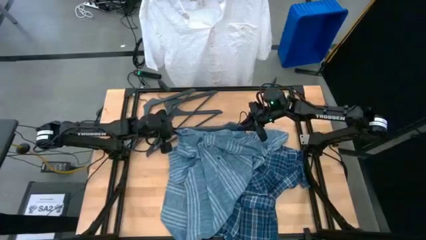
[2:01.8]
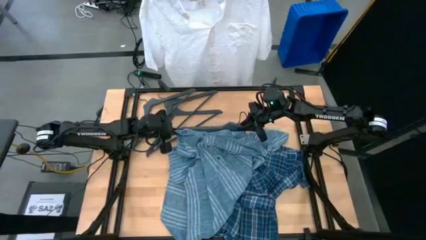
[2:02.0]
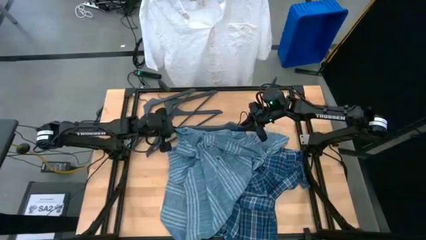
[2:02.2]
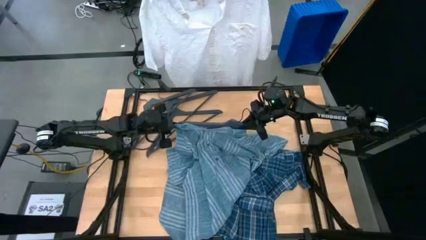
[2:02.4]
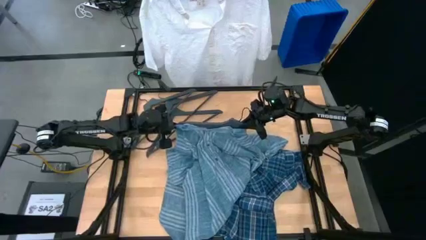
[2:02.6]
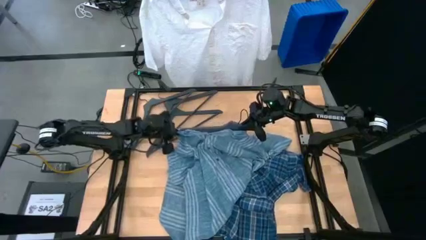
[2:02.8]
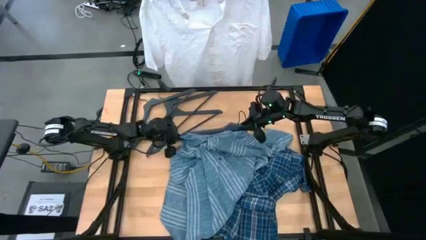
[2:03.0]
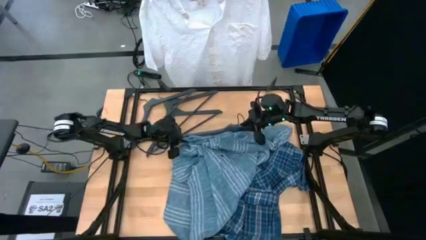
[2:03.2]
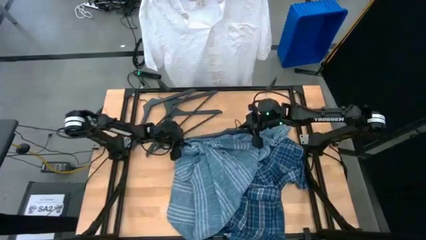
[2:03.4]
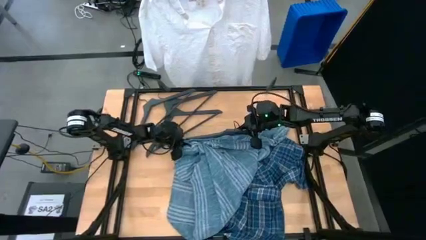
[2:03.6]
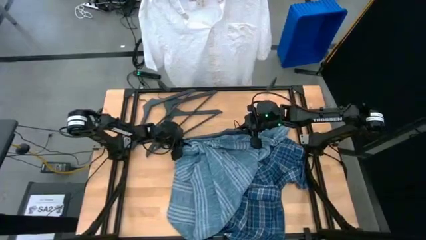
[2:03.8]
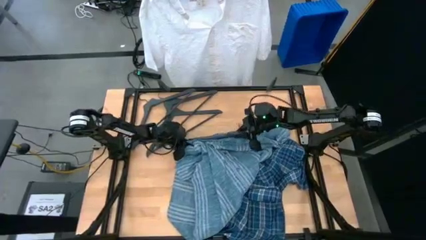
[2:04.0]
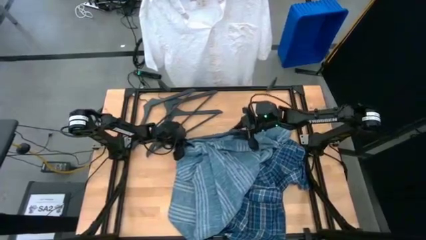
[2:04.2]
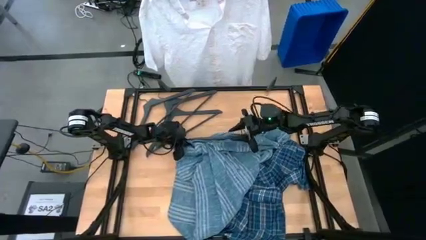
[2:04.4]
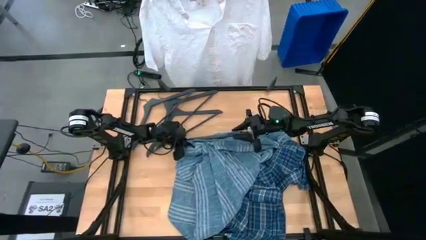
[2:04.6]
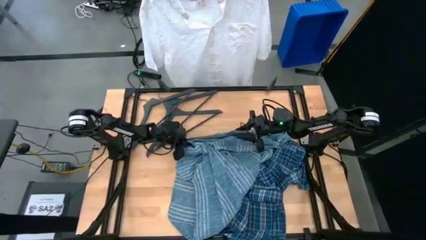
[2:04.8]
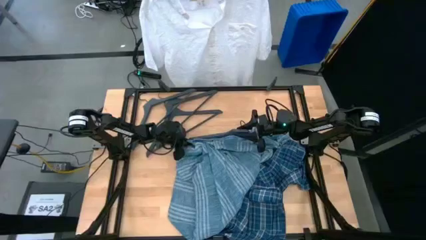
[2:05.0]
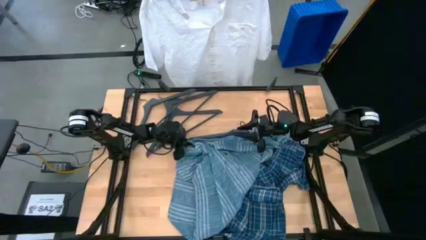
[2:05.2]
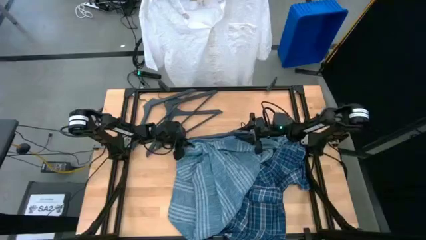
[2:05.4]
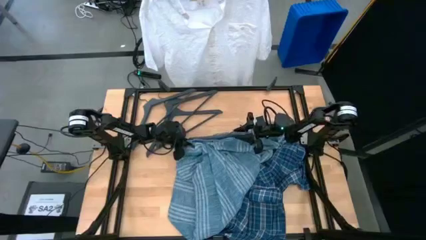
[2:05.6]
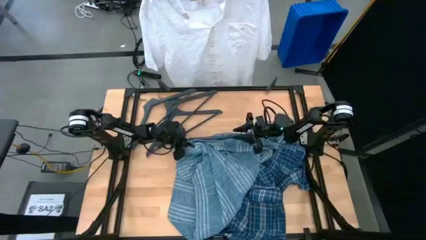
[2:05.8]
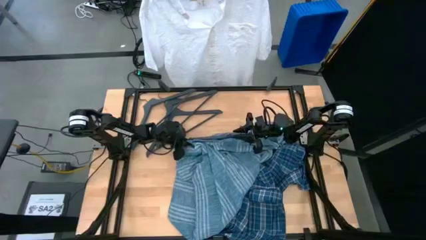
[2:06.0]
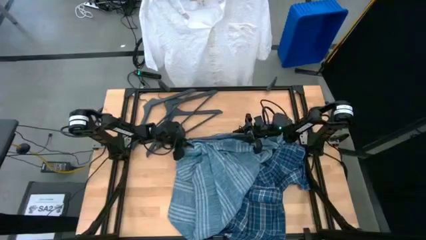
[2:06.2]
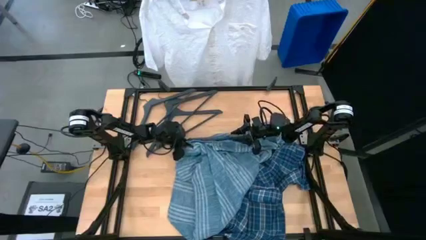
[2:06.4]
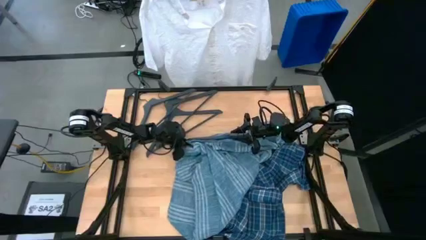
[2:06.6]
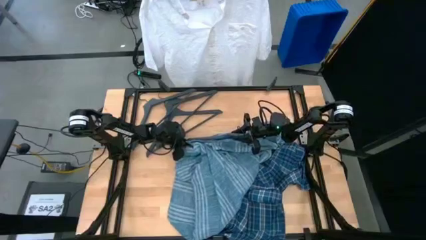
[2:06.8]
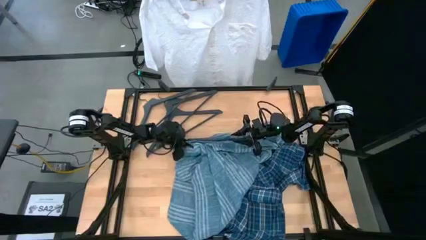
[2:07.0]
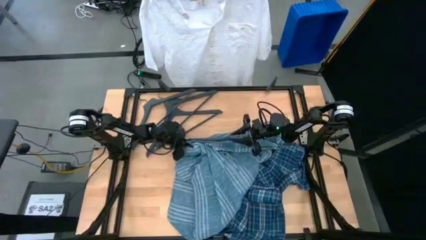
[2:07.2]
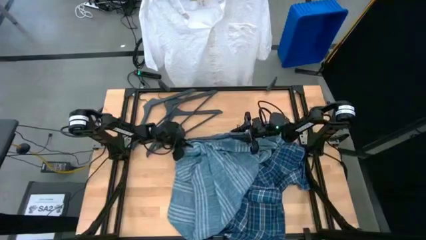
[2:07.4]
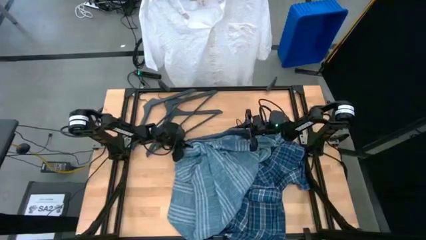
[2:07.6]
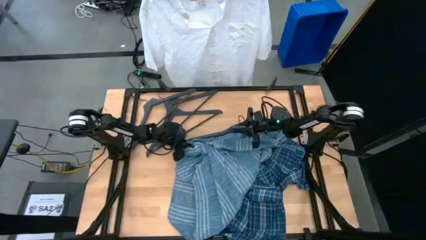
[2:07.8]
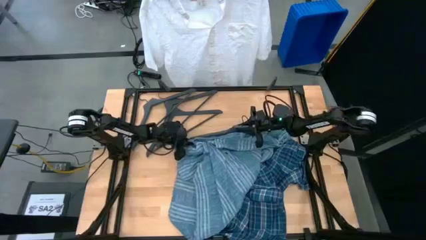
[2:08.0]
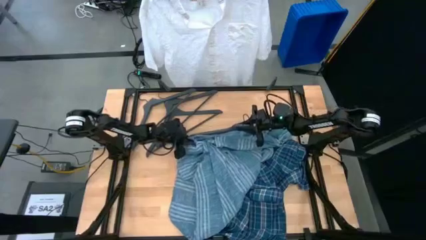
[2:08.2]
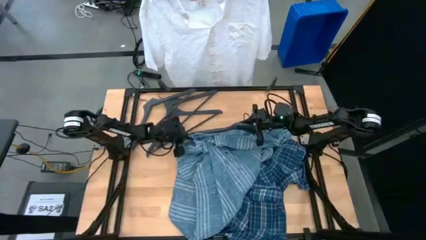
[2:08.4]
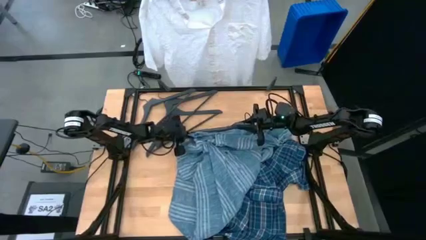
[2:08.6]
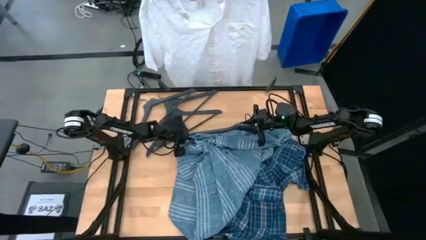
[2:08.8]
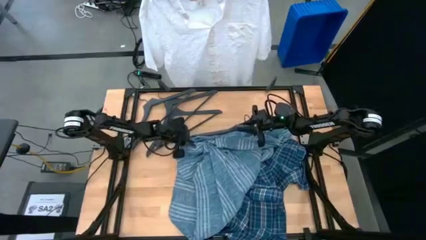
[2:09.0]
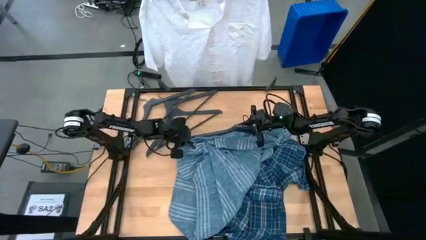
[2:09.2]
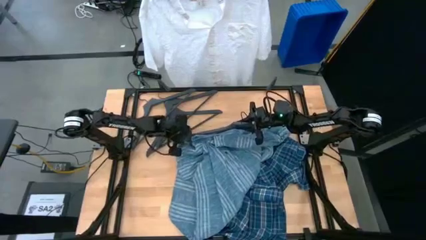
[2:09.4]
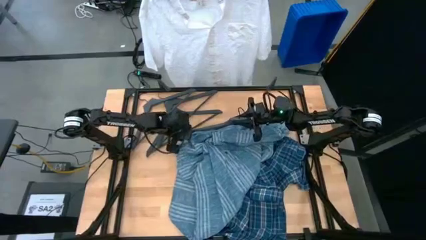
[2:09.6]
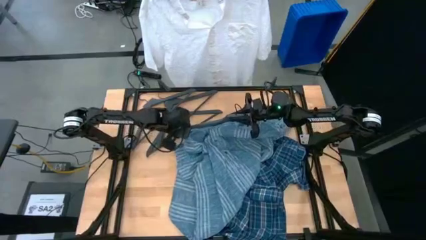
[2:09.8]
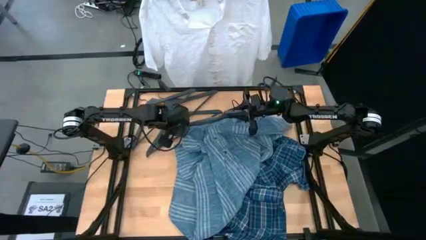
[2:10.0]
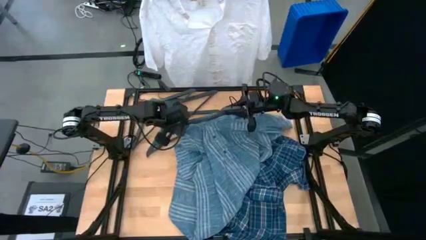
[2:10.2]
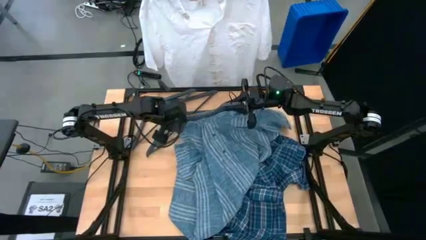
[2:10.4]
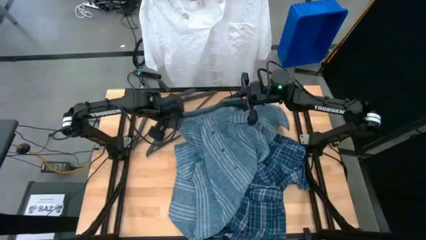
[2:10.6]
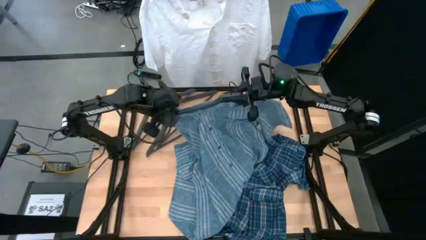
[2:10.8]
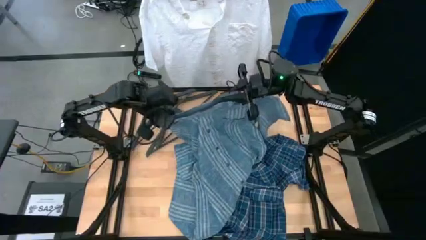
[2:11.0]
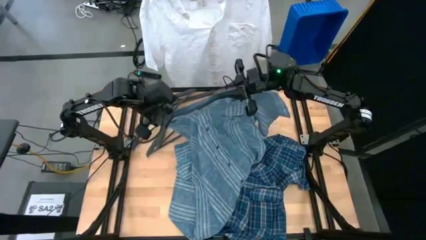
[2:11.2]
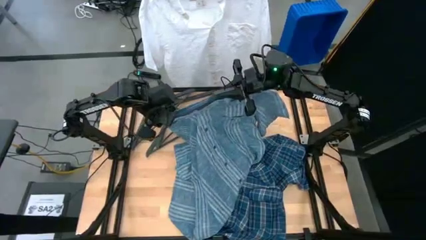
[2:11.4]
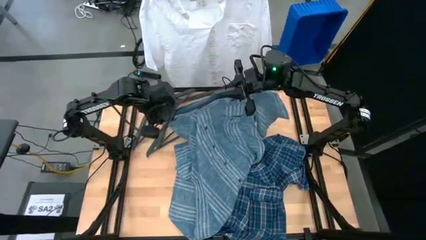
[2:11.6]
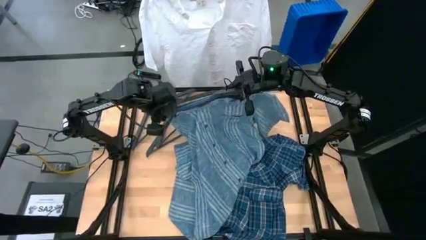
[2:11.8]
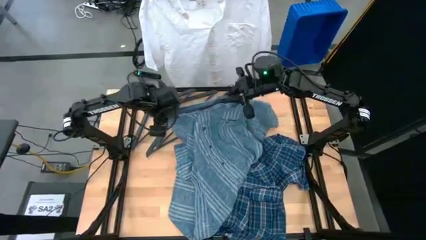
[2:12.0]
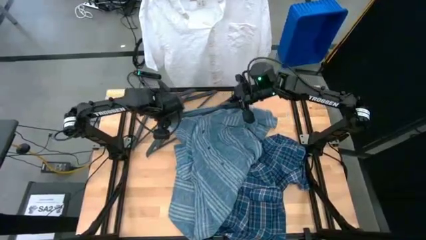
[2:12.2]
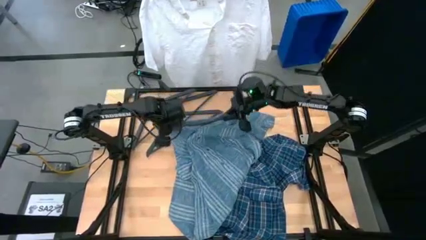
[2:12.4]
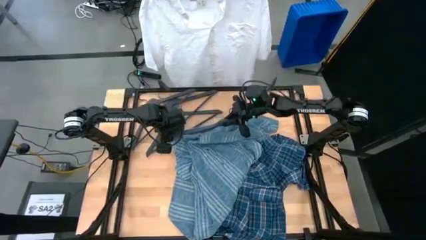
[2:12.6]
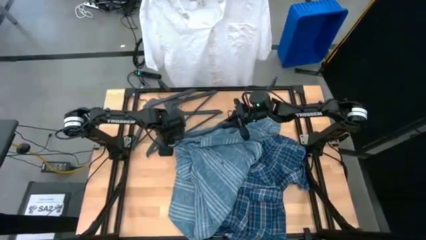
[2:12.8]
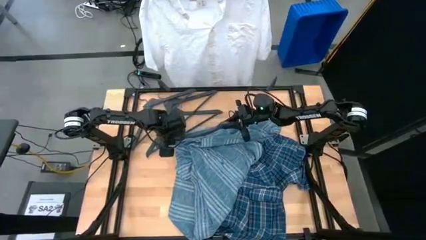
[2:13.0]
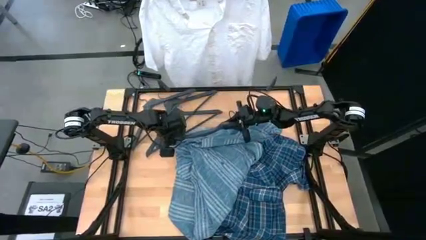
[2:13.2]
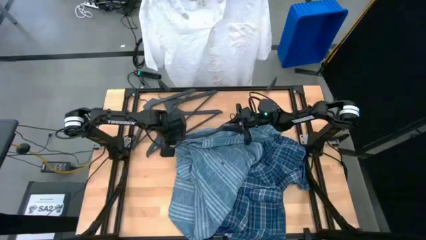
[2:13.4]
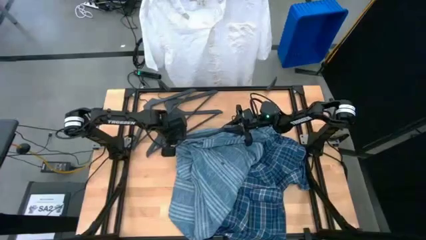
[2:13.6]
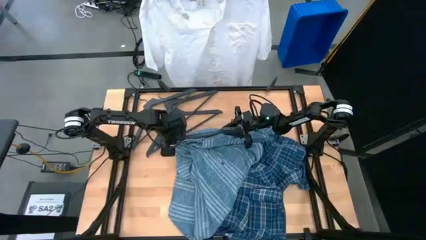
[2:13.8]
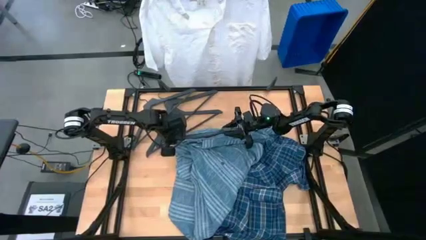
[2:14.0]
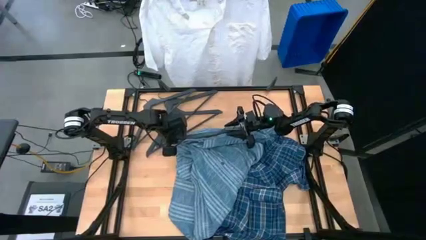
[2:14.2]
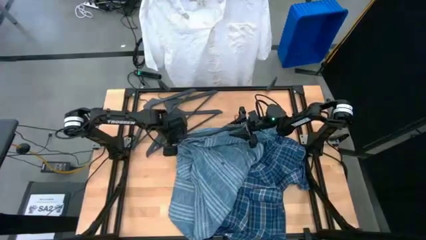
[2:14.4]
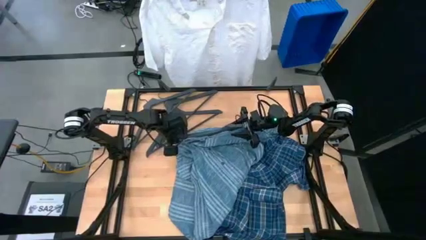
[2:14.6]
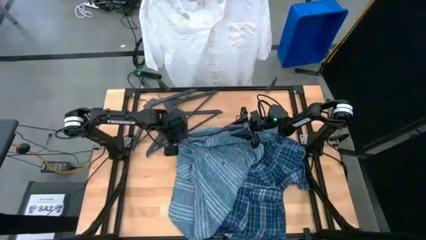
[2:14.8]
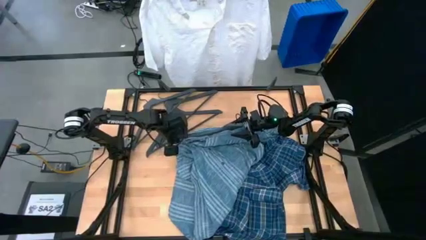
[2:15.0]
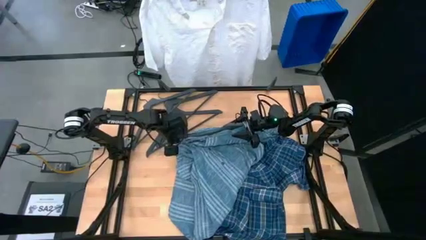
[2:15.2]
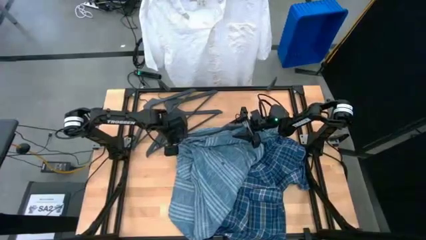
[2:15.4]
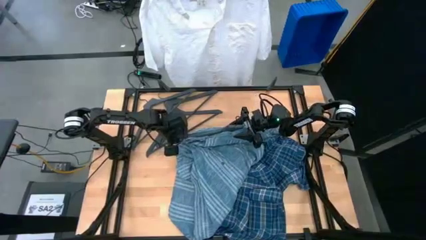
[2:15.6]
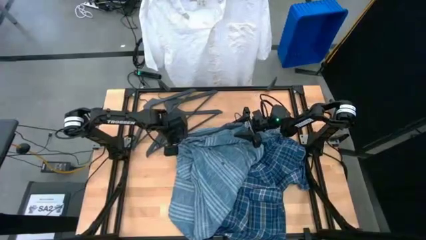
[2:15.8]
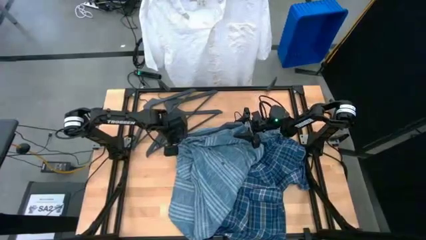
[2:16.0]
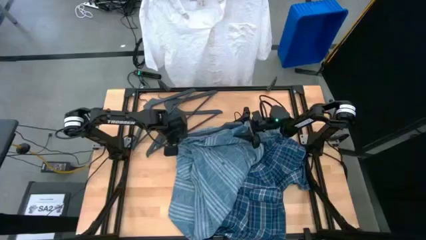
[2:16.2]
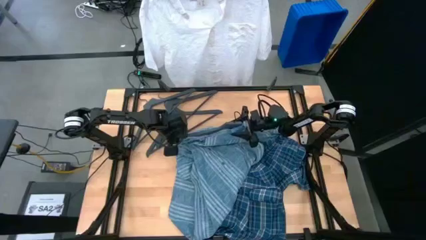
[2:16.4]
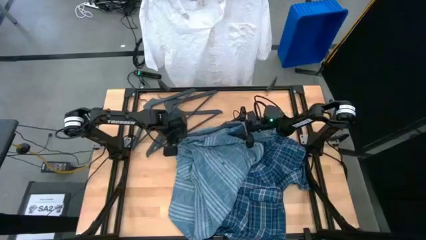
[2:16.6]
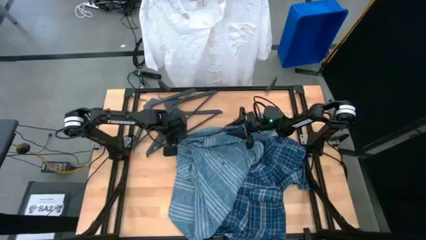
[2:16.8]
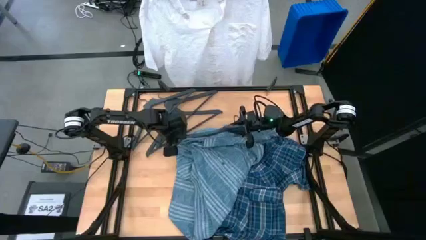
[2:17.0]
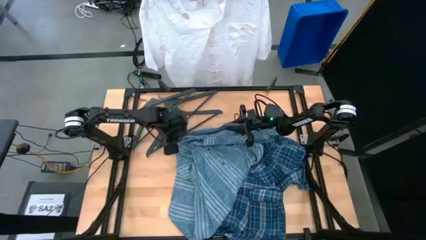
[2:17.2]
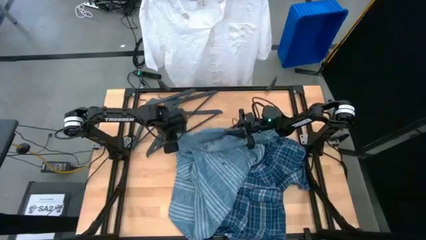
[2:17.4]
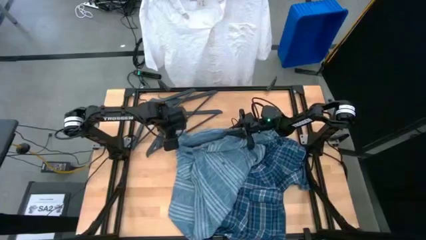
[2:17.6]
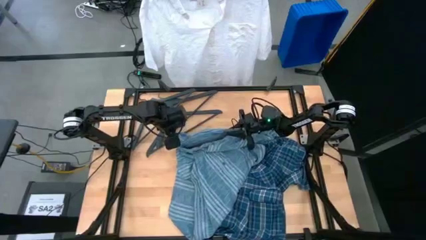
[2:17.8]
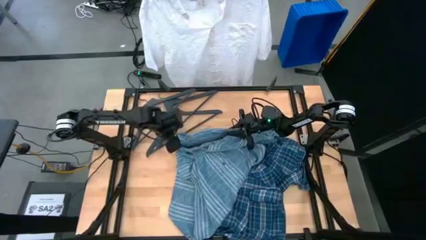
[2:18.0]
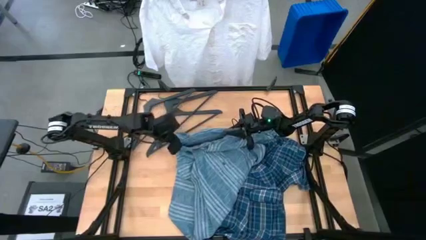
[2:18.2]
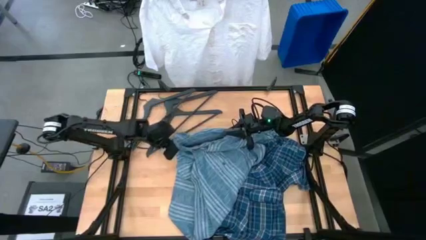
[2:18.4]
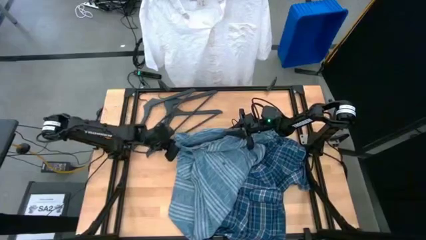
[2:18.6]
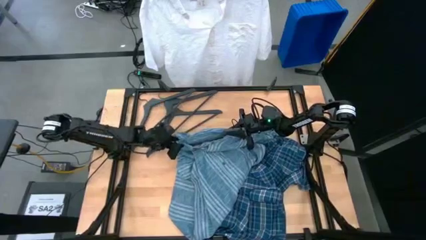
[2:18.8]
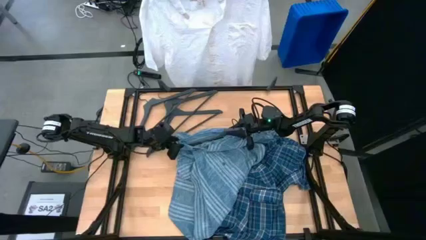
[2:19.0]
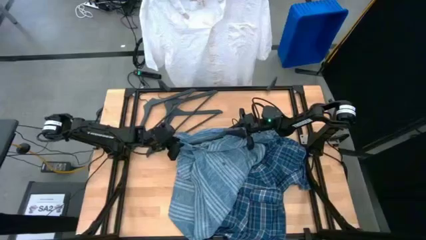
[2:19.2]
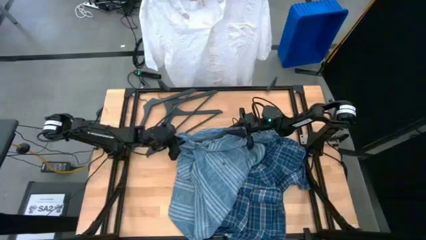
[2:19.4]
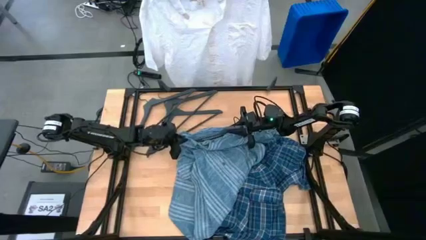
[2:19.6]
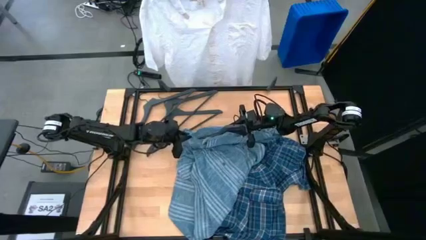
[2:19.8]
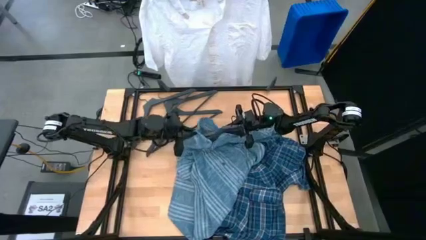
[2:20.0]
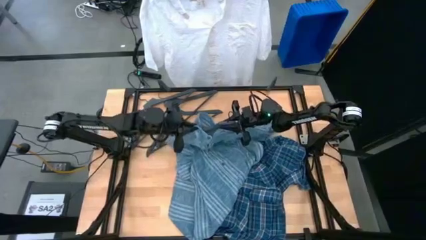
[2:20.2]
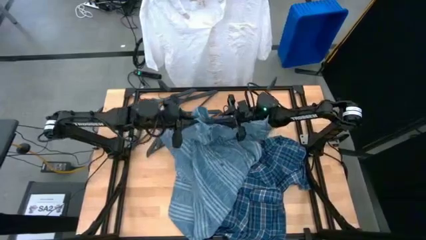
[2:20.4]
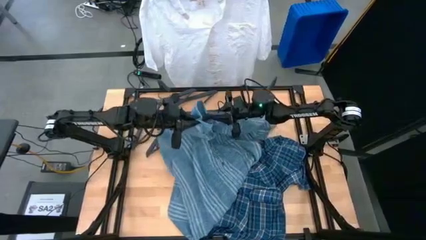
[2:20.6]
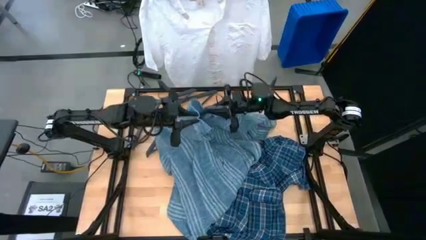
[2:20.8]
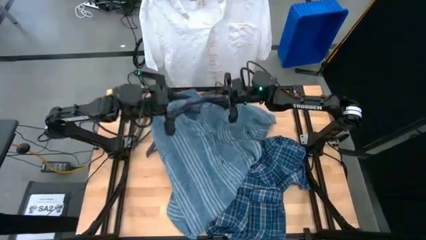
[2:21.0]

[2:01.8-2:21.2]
Task: Hang clothes
Insert the black hanger into the green shirt
